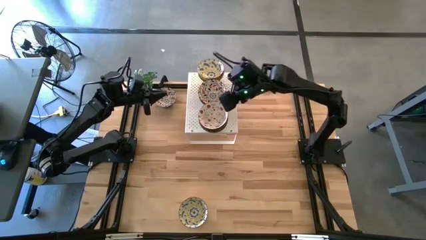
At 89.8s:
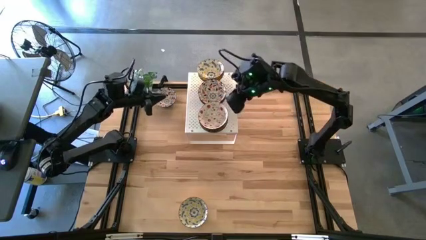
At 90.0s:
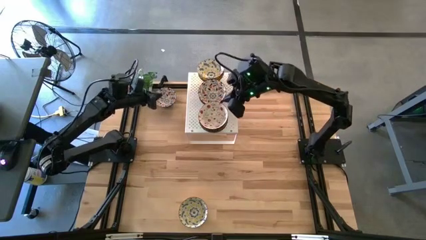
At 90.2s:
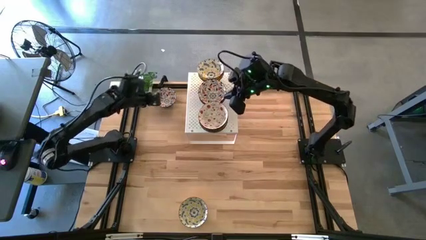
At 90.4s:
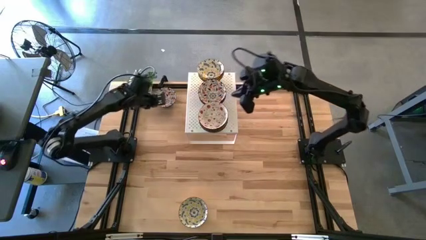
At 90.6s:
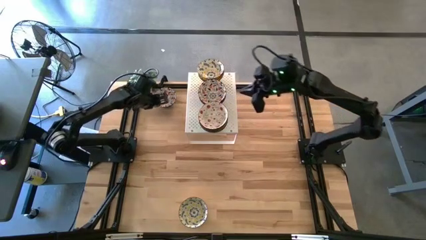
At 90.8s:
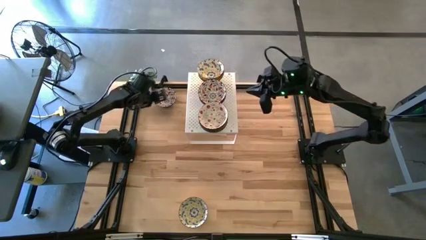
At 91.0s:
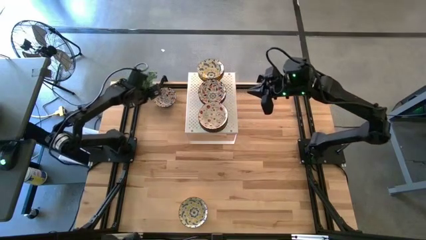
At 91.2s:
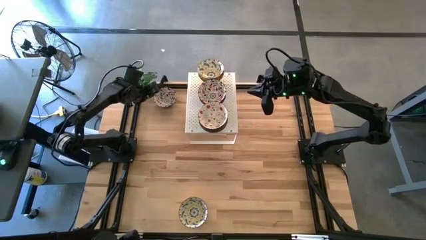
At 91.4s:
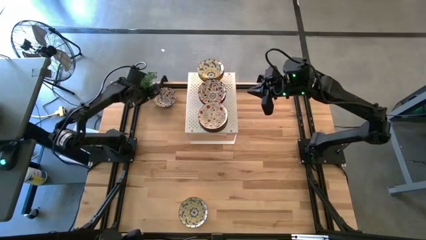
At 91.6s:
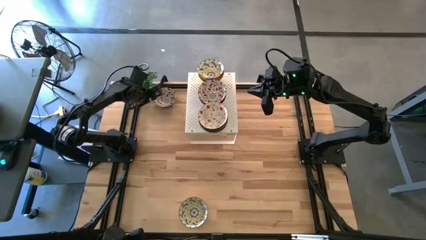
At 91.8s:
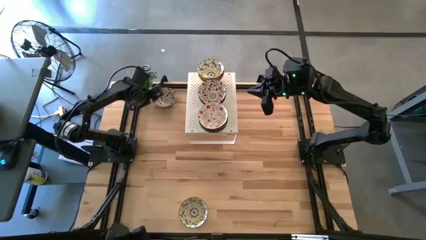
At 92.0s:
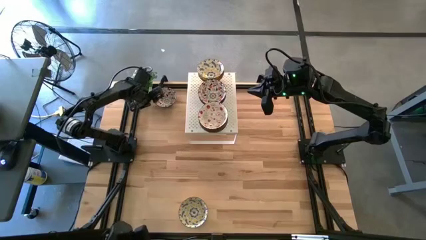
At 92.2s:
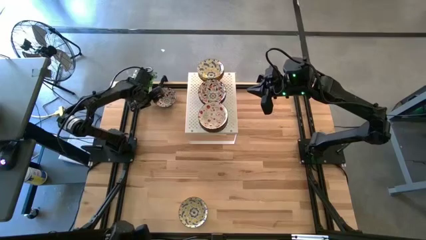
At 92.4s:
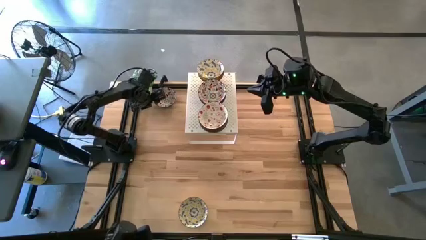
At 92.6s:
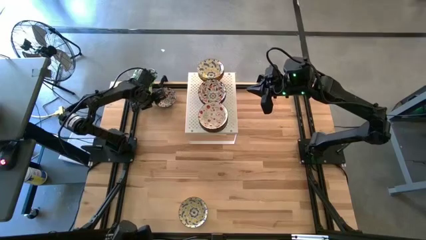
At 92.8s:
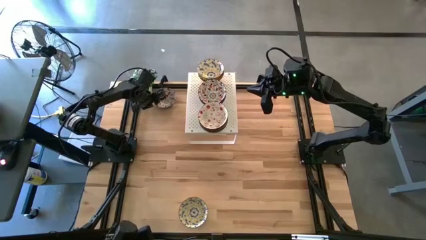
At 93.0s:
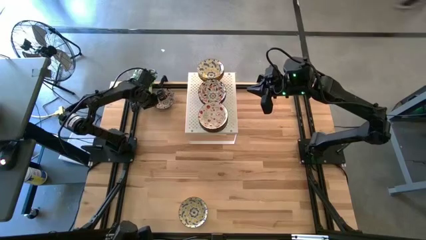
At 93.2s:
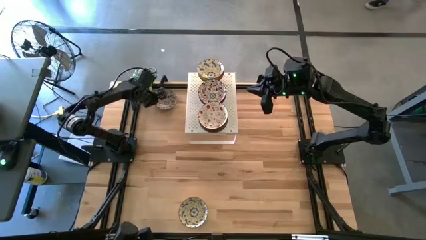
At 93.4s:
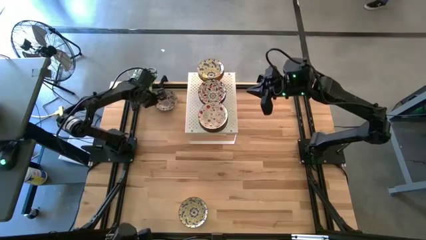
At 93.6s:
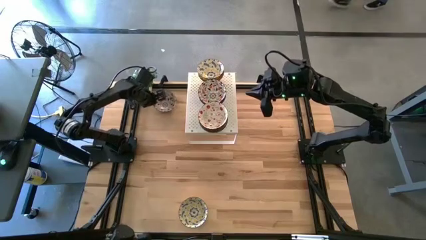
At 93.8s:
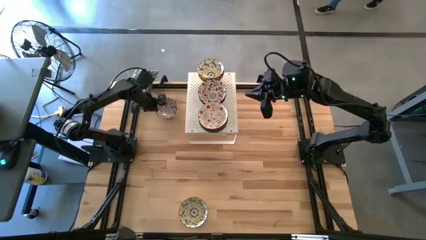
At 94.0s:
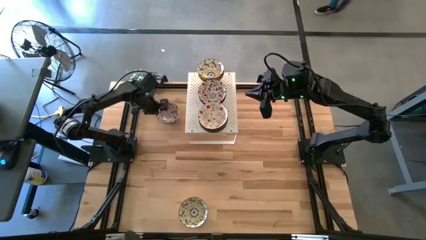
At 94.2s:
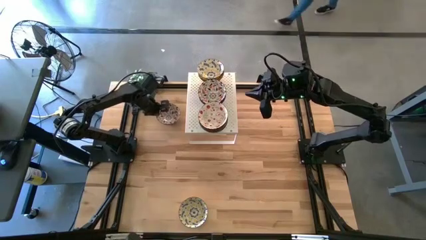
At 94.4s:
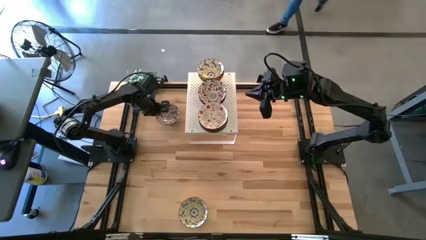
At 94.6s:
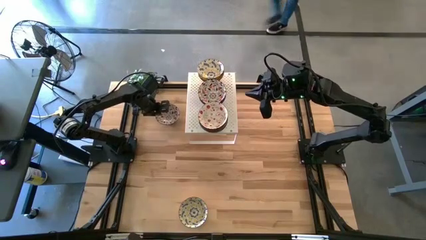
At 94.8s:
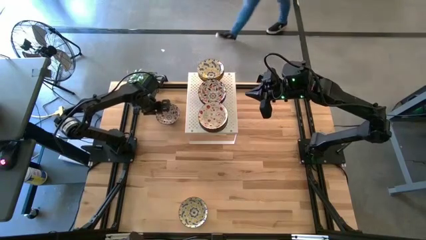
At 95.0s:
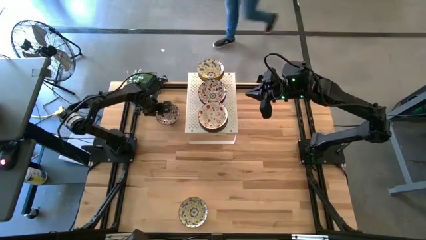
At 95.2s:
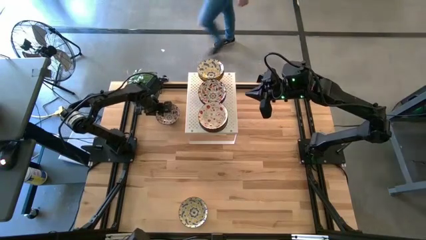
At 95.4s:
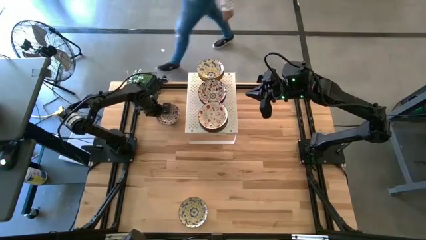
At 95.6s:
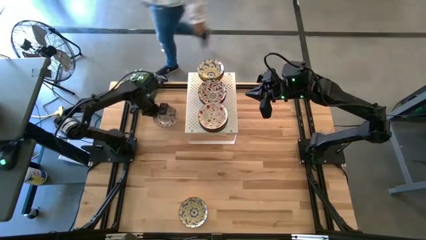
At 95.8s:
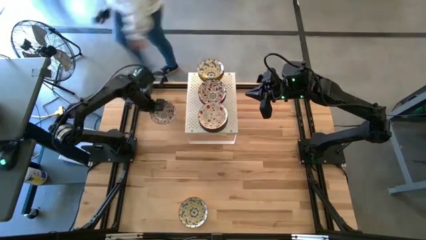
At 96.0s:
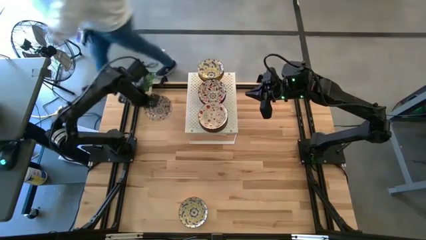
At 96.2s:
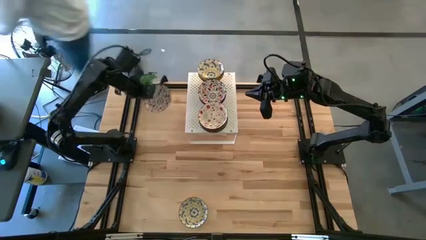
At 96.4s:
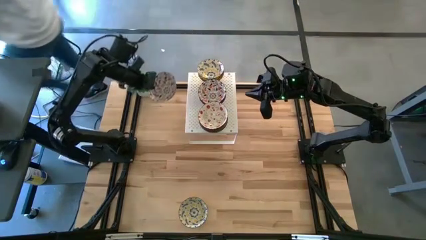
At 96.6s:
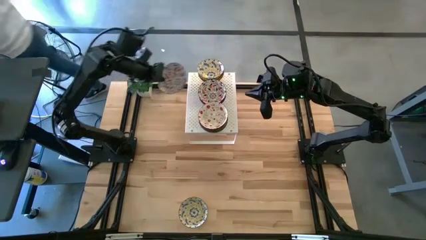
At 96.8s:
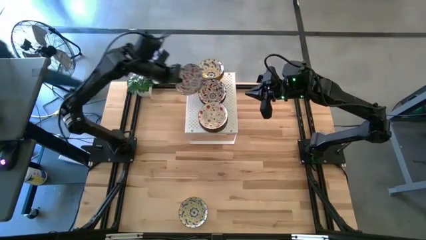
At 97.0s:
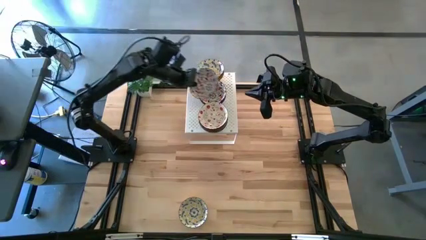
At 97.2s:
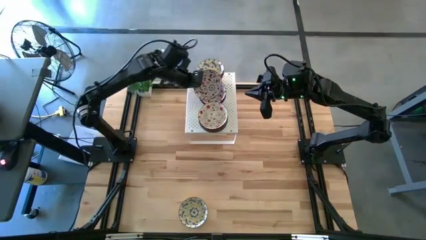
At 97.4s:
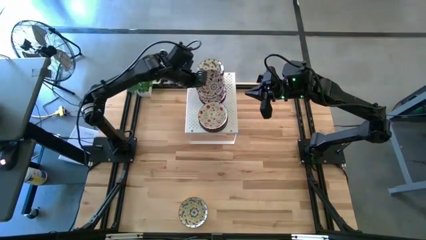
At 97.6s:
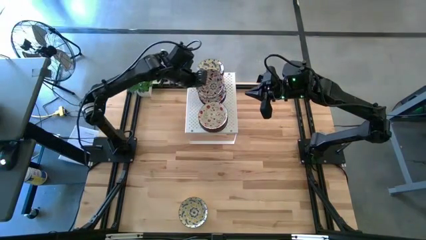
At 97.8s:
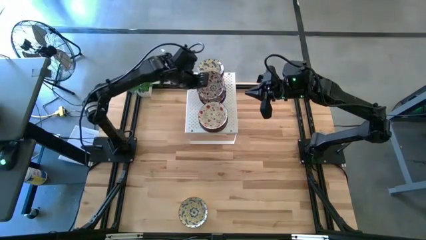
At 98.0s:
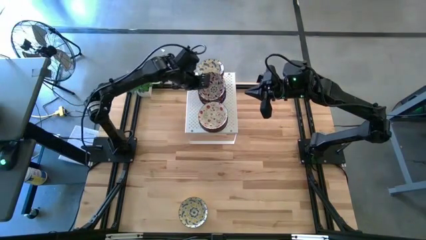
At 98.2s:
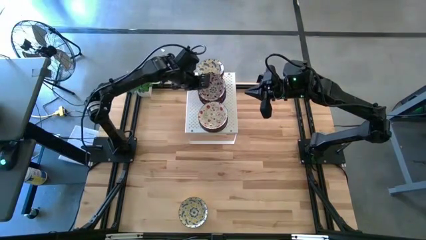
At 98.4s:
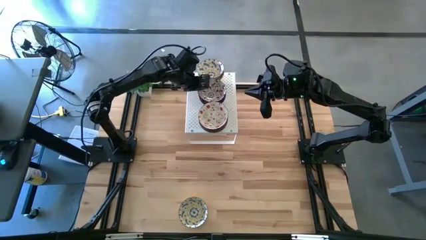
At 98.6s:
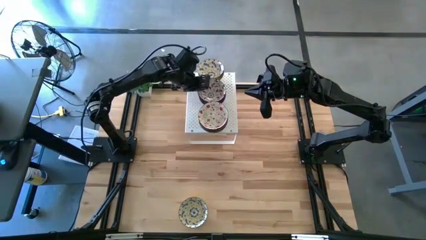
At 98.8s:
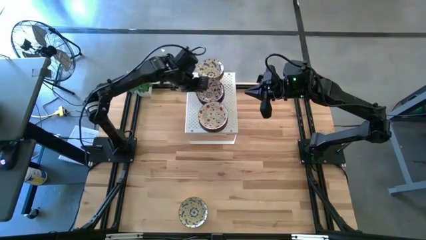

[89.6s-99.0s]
Task: Pick & Place Mini bowls
Stack the orange patterned bowl on top of the orange patterned bowl on the shelf

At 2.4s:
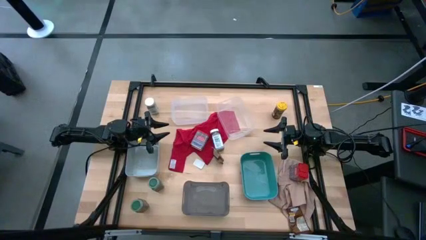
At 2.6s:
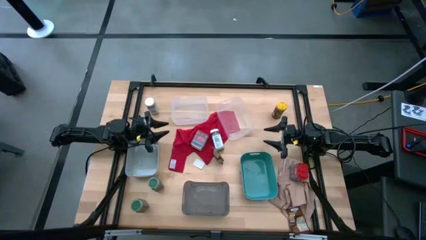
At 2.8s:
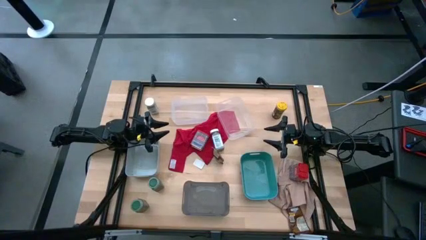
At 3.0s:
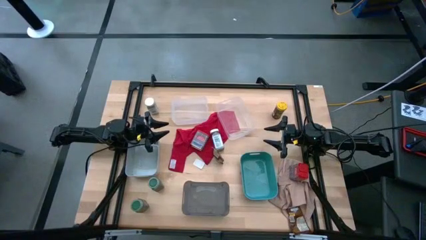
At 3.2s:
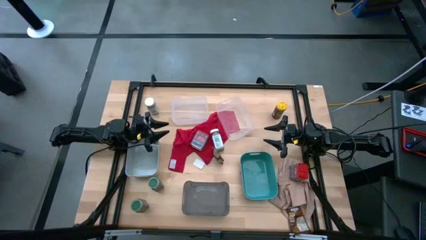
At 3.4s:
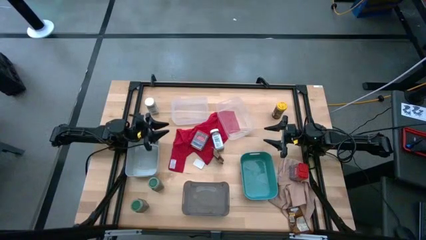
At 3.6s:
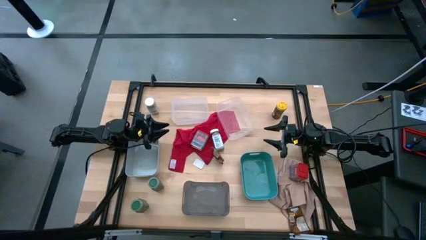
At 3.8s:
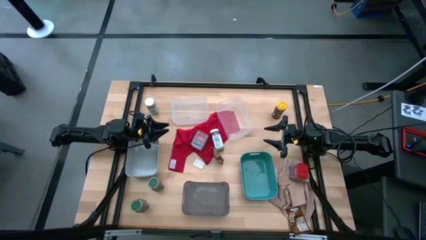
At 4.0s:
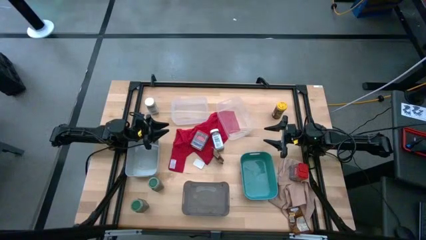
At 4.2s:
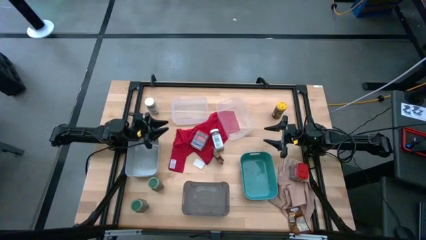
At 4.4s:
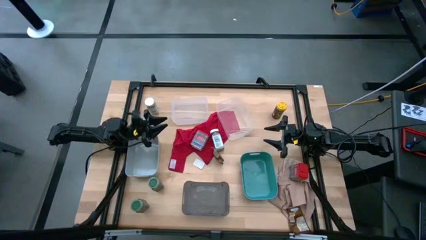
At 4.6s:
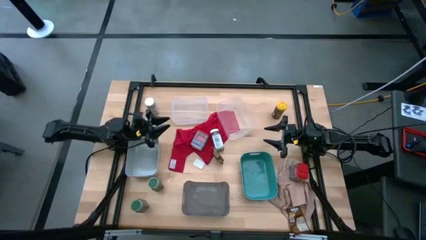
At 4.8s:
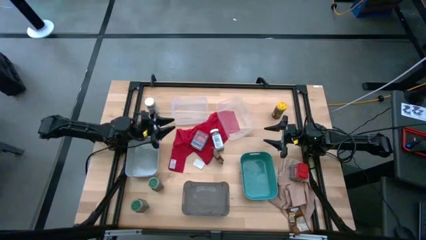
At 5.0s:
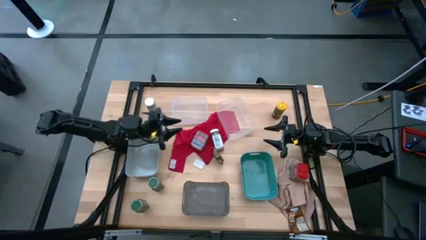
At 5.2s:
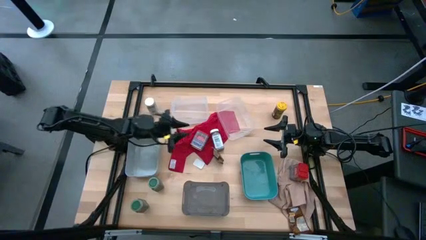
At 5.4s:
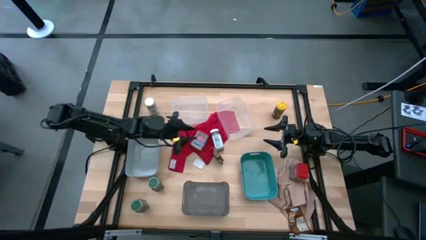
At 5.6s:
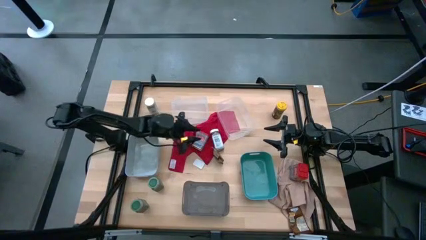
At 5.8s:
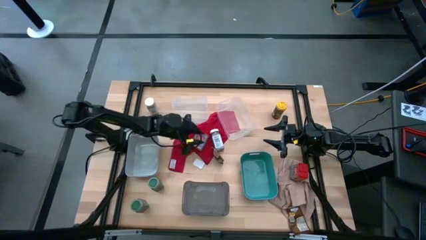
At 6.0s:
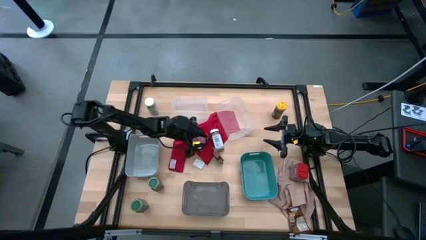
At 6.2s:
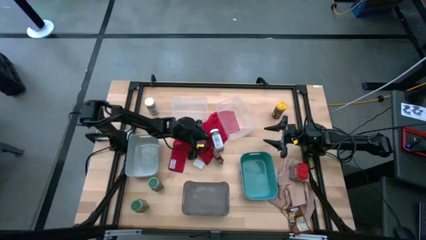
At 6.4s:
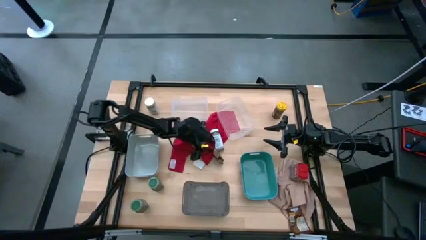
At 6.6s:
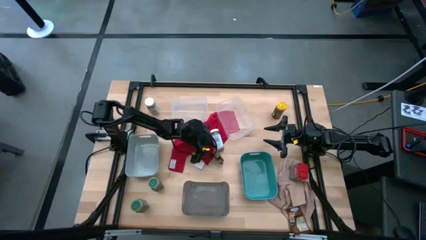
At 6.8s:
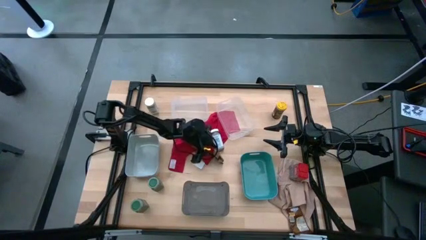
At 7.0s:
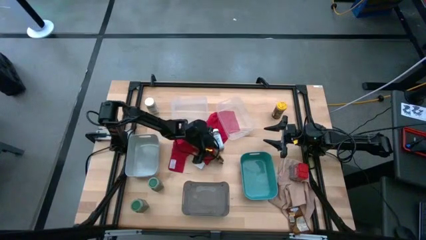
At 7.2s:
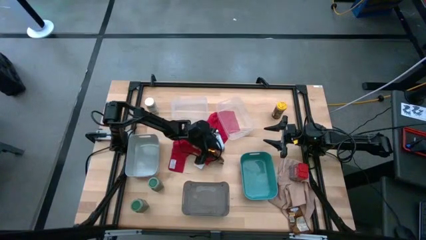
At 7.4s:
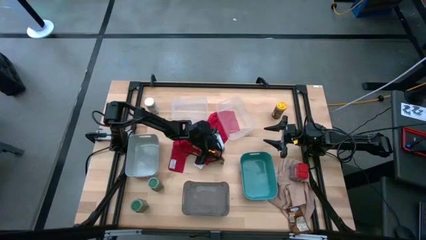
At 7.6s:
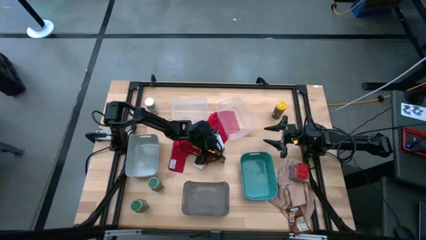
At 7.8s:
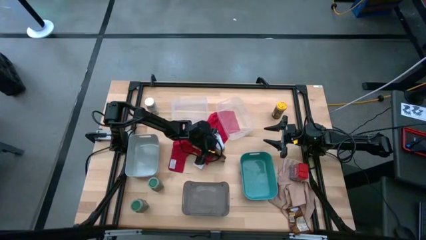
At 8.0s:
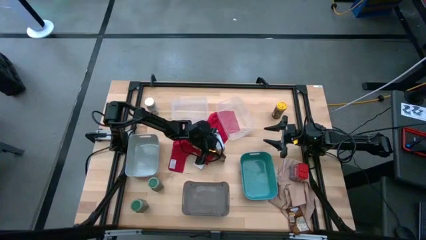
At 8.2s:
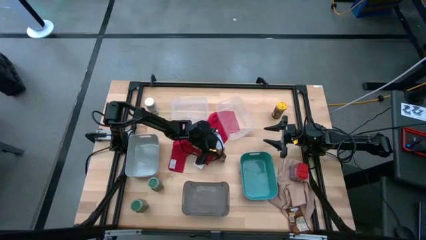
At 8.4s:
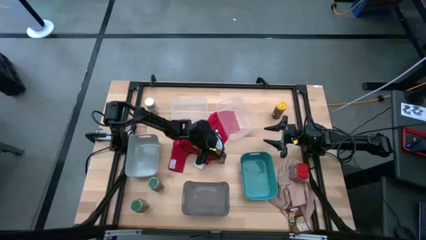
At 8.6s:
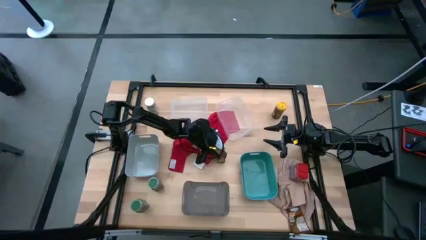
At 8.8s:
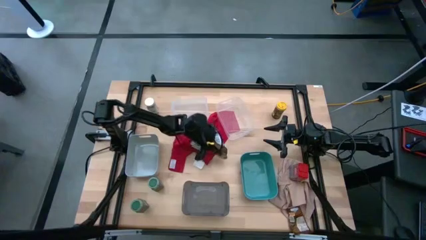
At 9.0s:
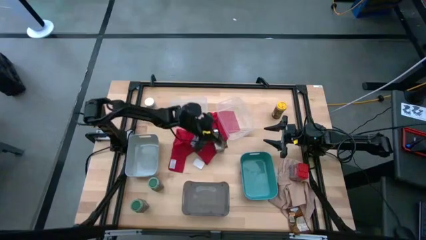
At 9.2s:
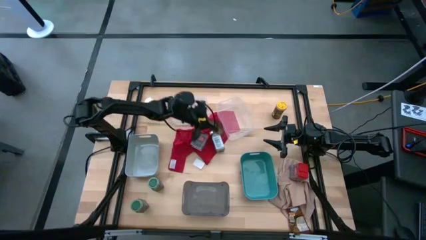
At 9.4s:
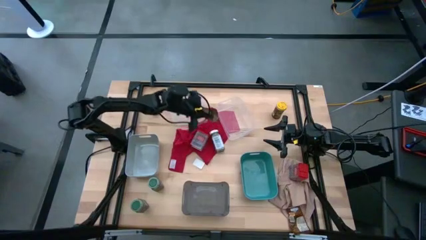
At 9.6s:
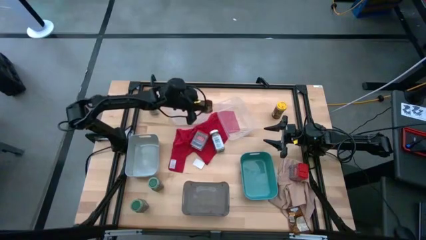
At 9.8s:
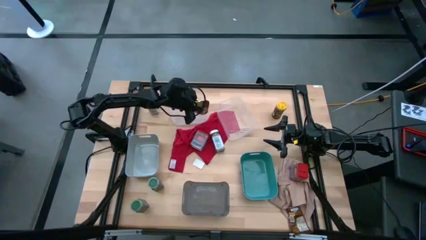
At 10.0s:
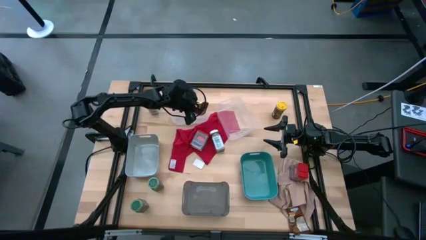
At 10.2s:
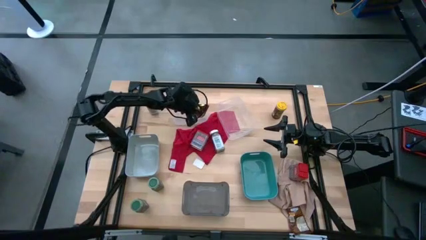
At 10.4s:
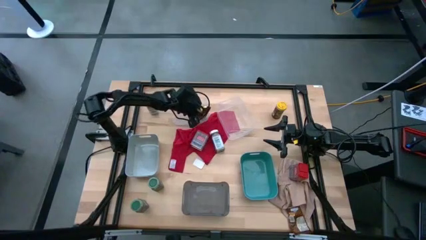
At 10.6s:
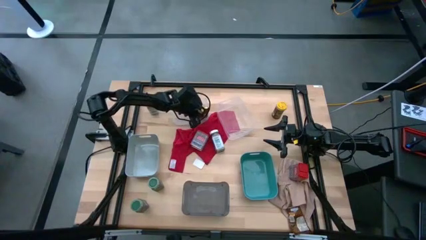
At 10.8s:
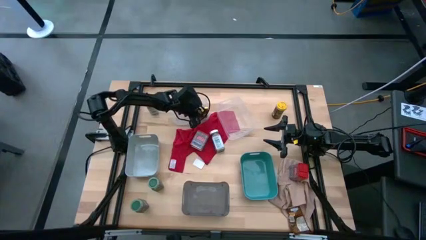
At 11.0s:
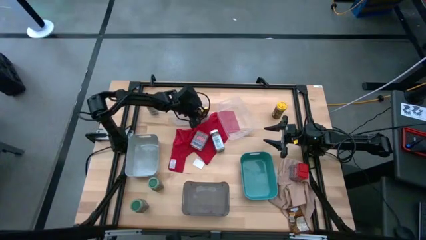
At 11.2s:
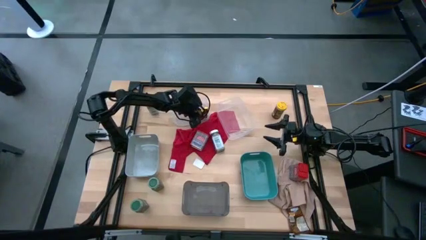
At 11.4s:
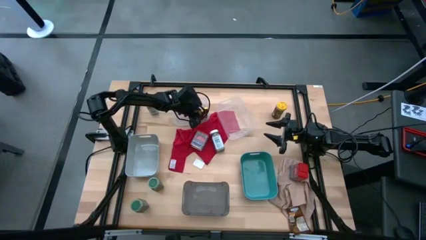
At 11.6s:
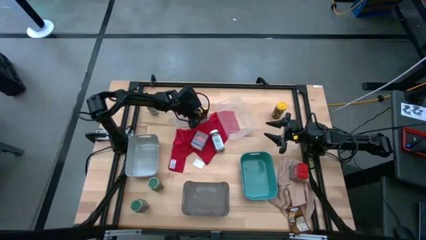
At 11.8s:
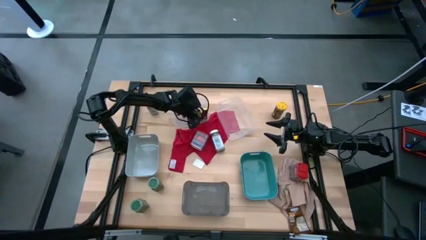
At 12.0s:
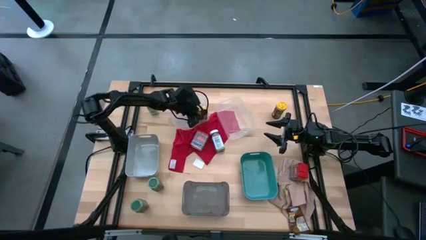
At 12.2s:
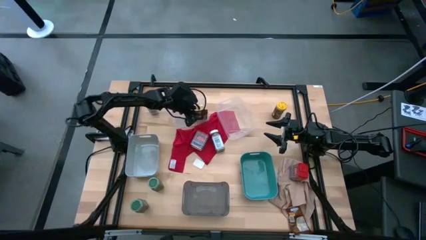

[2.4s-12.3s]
Task: Sort spices by type
Put the top orange seasoning pack into the left transparent bin
